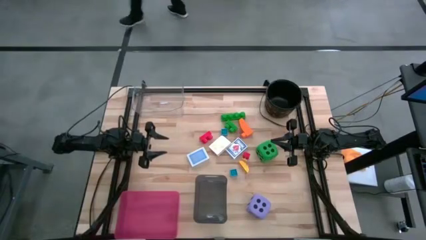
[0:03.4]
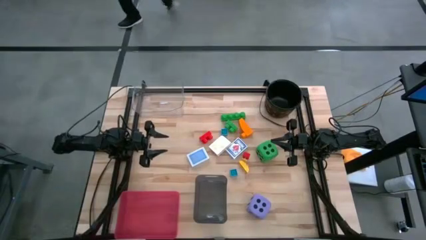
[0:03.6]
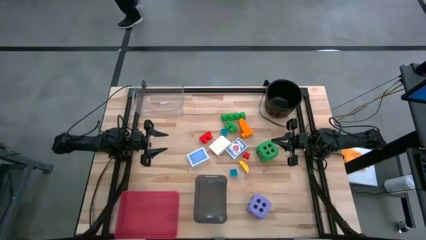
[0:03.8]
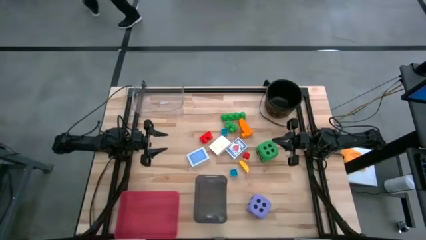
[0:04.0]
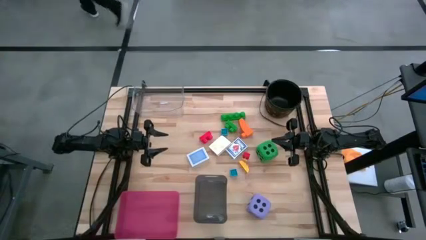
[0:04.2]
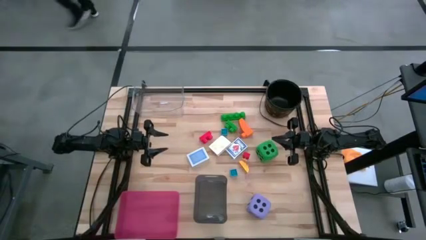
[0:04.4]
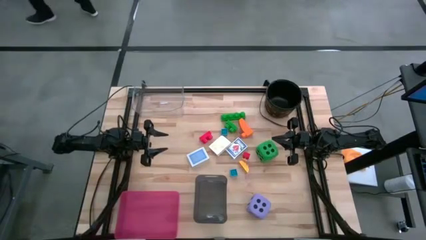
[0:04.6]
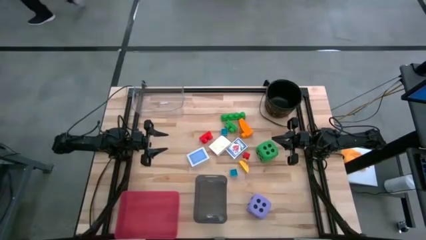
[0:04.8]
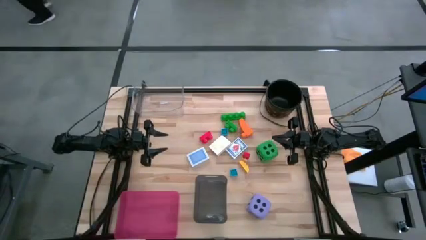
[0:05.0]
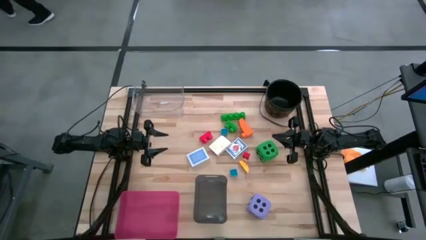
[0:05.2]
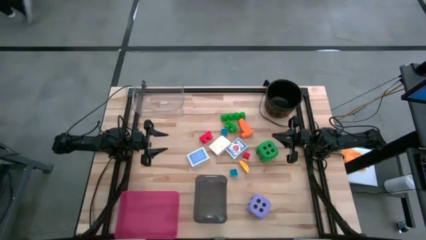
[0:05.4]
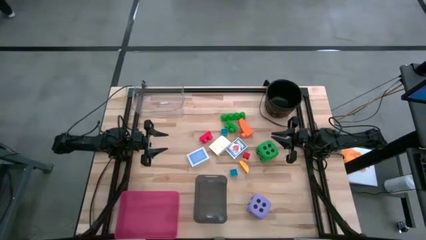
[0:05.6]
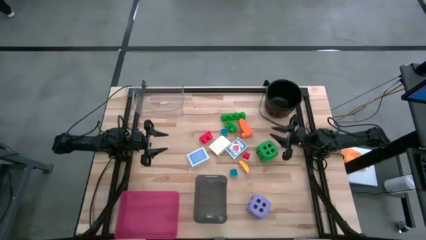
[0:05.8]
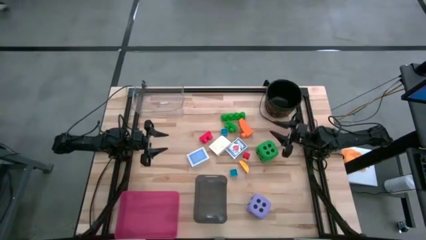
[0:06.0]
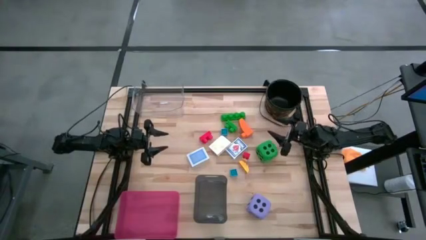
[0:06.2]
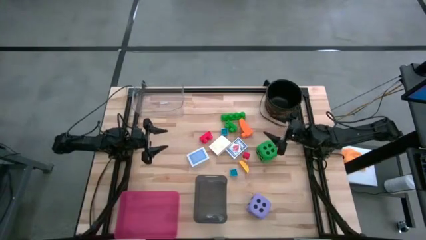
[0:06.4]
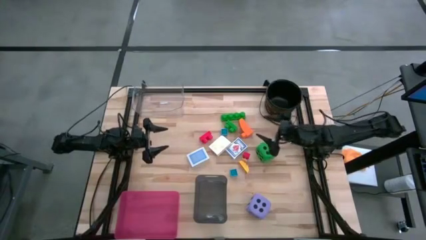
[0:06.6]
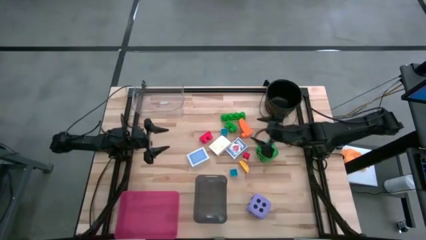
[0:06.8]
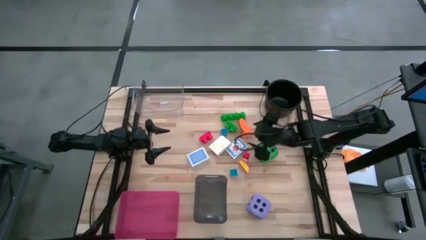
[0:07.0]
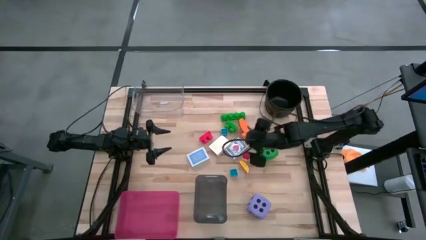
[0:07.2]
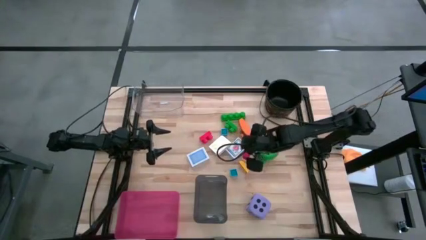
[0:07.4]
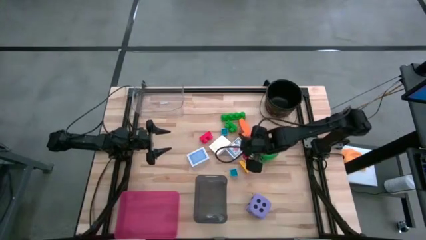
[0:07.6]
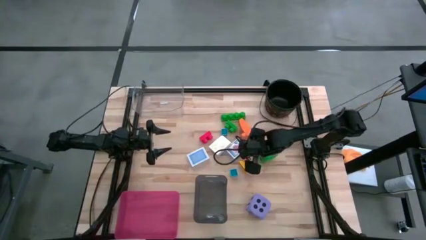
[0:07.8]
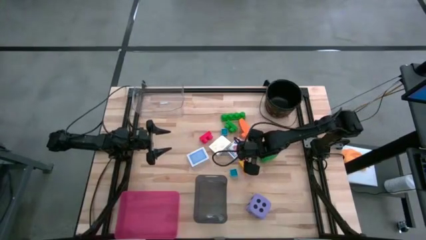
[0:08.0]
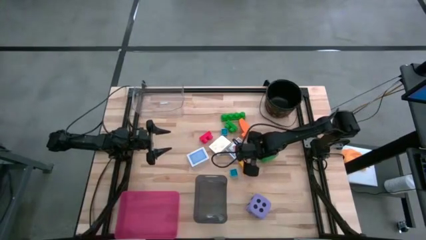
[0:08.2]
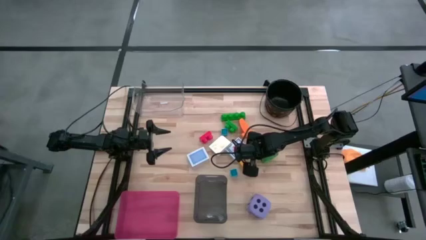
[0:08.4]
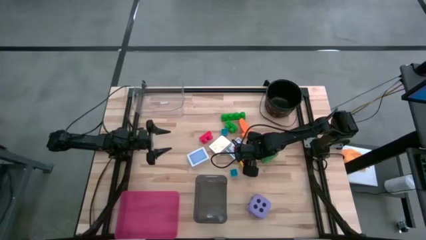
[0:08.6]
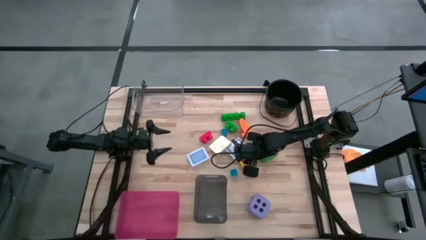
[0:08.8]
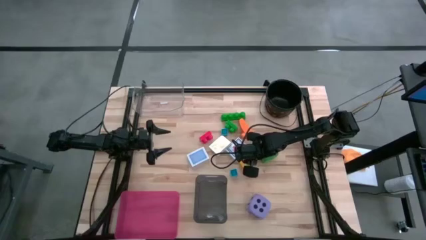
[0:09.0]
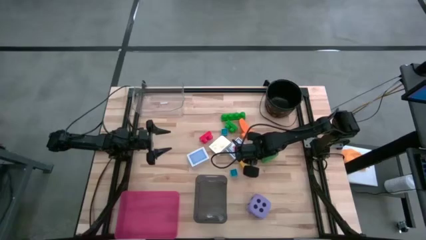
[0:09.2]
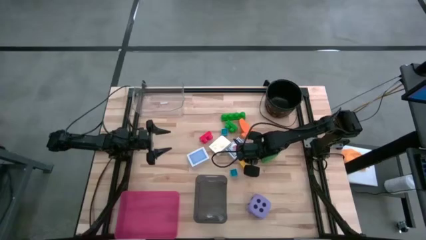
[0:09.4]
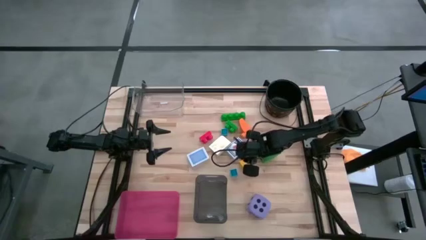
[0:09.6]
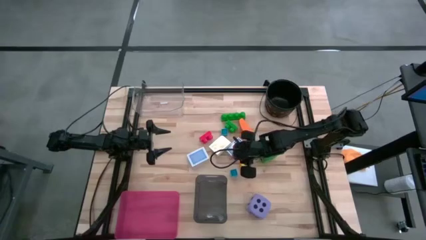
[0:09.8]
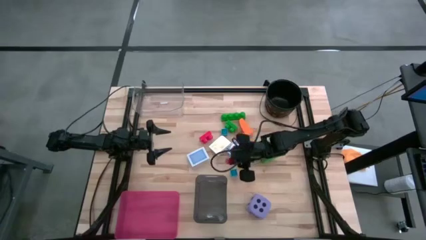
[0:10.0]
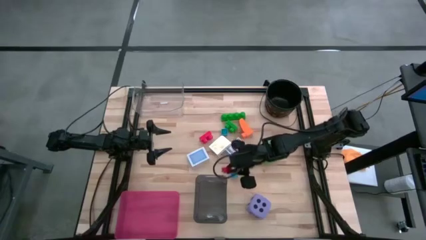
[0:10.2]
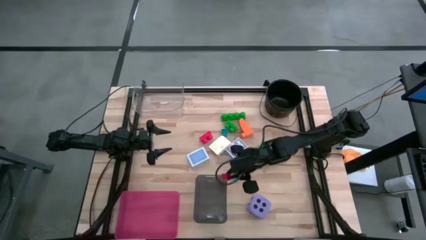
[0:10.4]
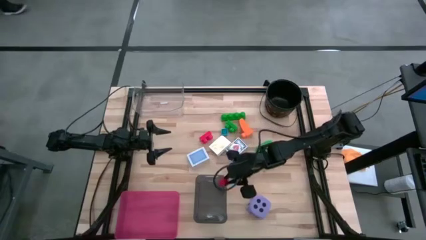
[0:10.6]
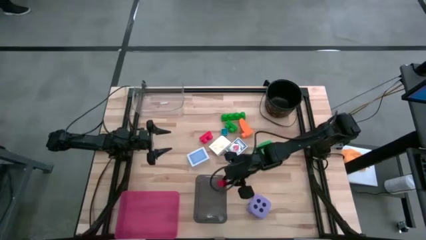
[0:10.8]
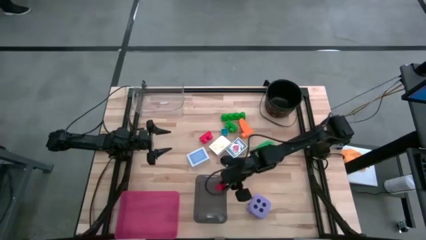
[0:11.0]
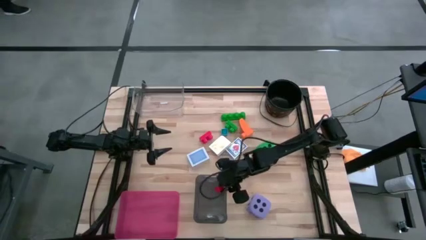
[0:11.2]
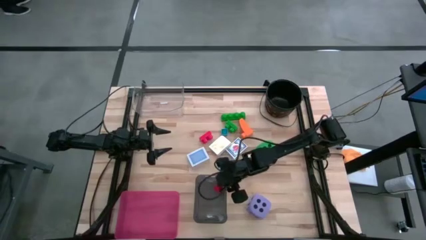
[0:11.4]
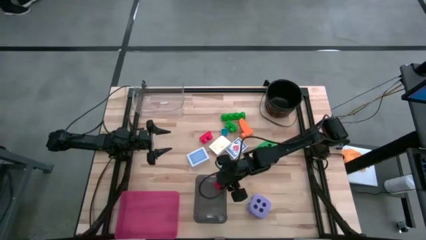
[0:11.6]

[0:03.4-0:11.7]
Task: Pick & Place Toys
Put red game piece into the black bin

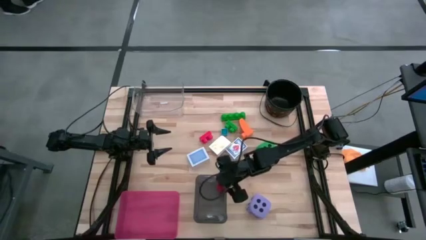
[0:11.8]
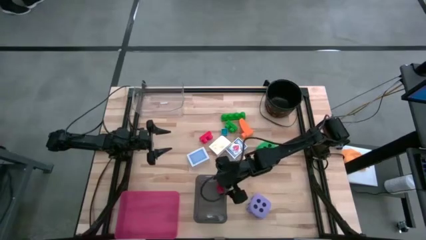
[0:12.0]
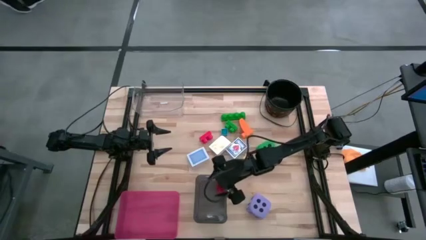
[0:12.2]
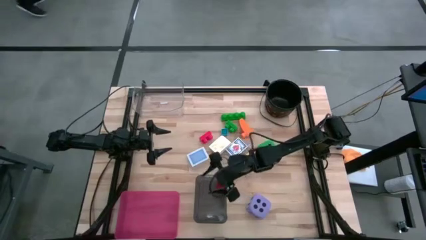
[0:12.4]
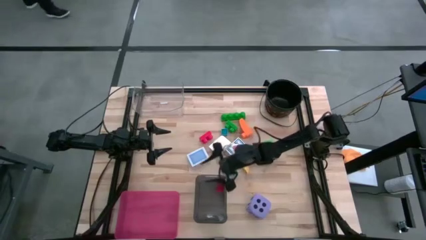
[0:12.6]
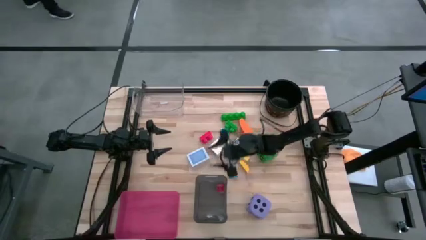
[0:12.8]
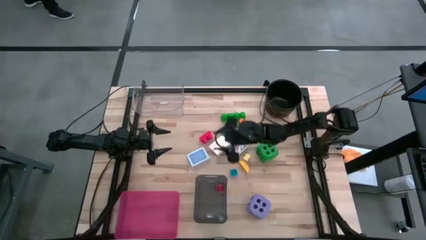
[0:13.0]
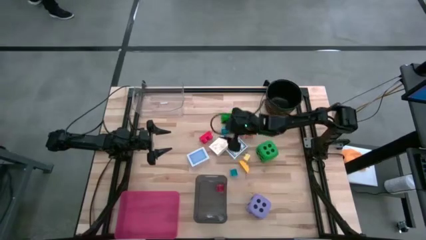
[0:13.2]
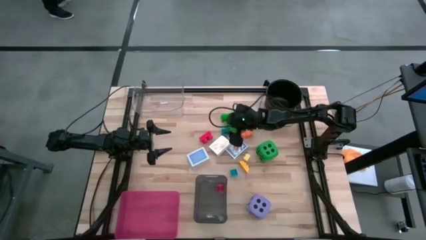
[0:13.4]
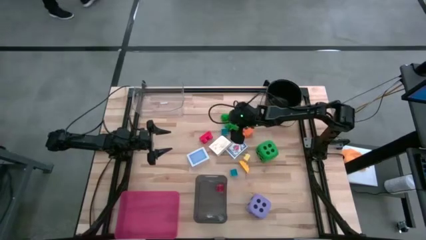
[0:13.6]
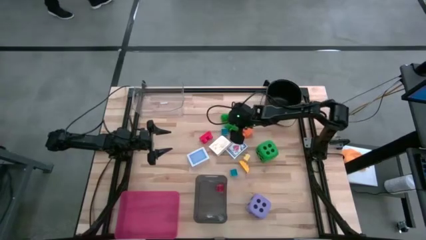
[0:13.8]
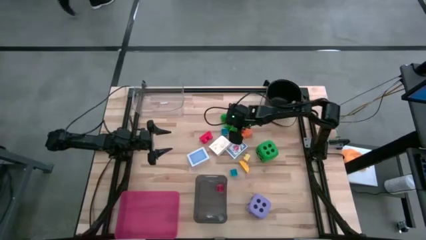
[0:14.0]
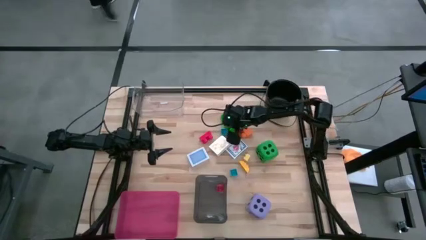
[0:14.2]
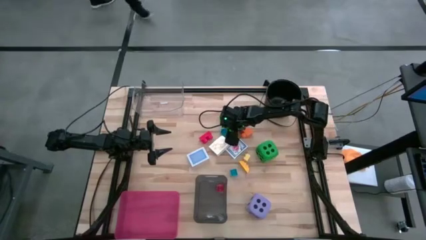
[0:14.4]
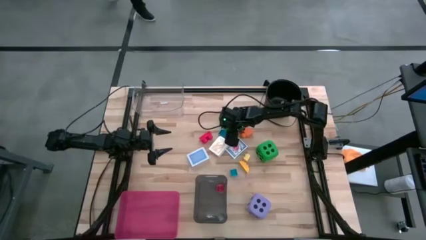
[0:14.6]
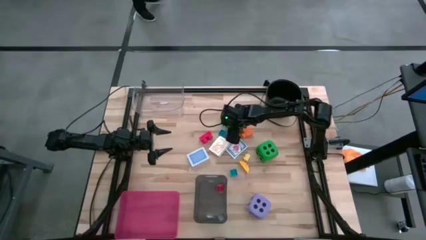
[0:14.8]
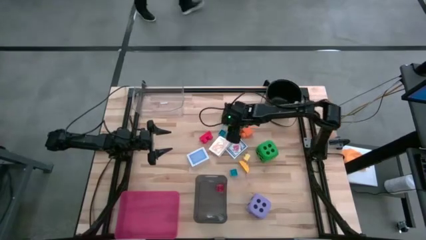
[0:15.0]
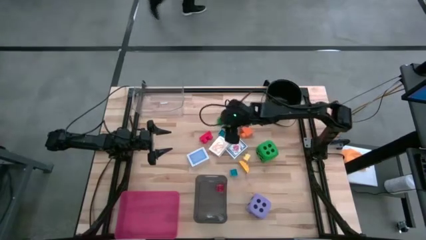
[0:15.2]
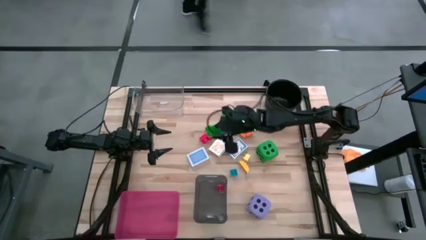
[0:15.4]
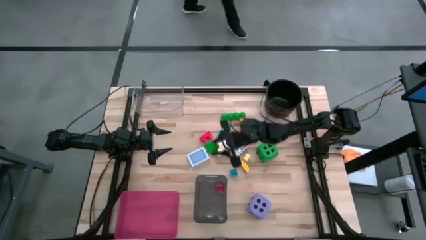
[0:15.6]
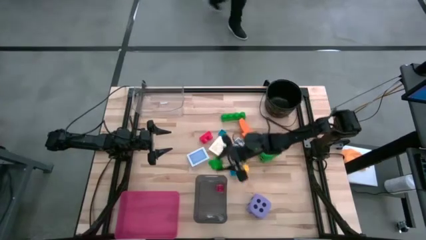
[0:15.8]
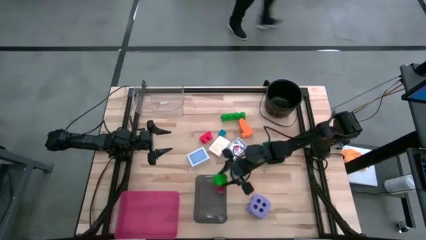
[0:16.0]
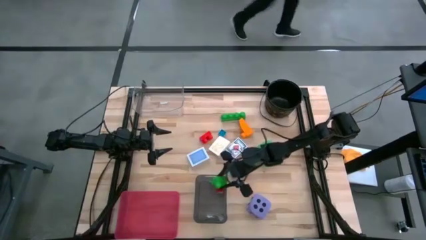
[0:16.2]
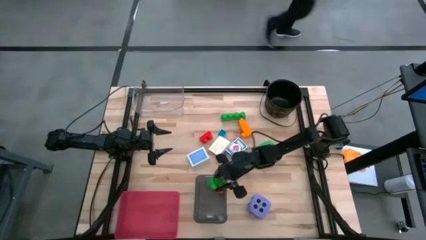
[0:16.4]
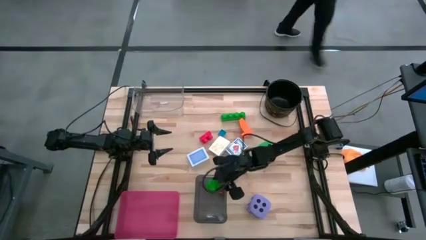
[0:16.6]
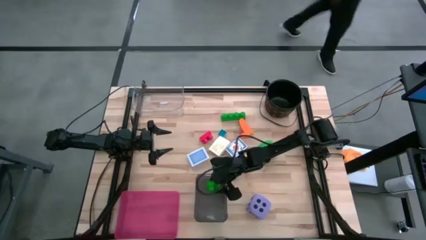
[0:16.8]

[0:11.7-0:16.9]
Put the green game piece into the black bin

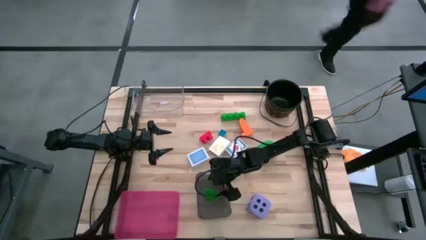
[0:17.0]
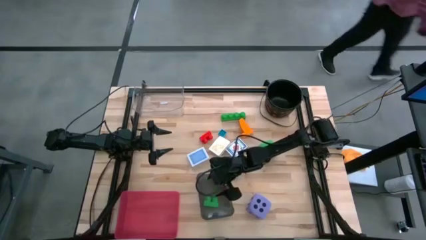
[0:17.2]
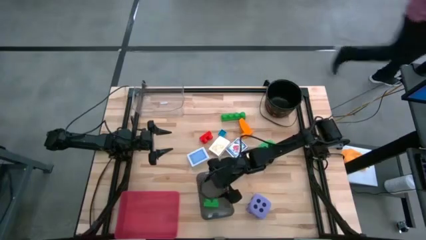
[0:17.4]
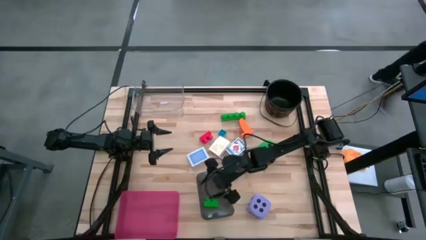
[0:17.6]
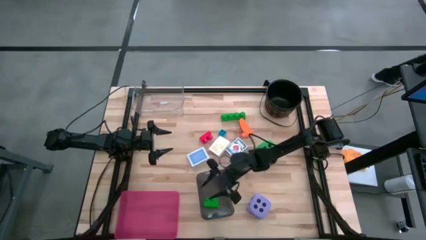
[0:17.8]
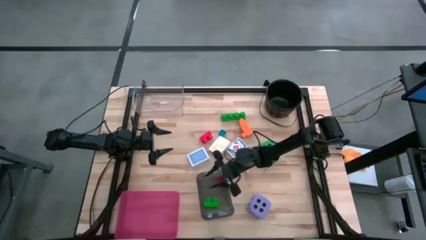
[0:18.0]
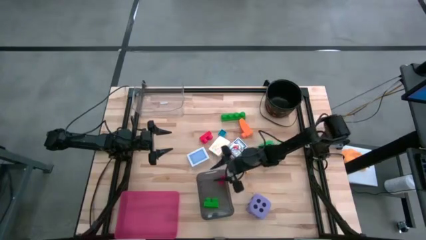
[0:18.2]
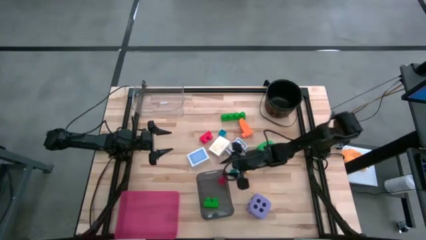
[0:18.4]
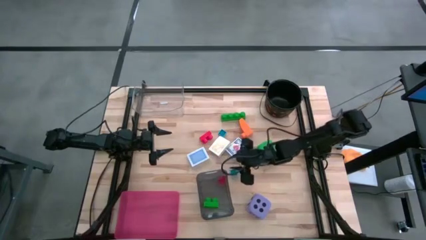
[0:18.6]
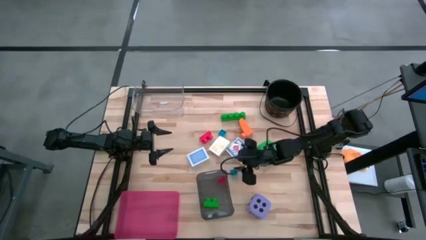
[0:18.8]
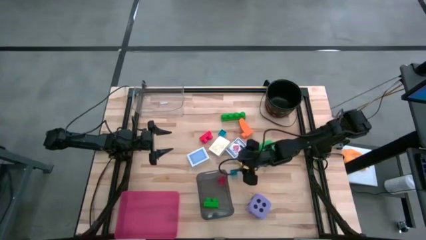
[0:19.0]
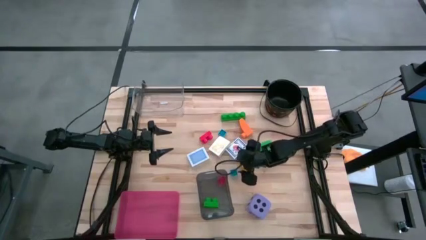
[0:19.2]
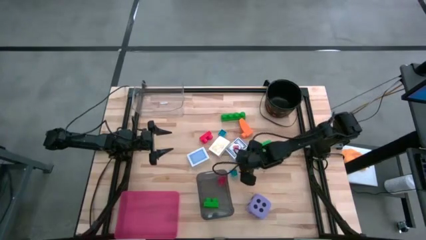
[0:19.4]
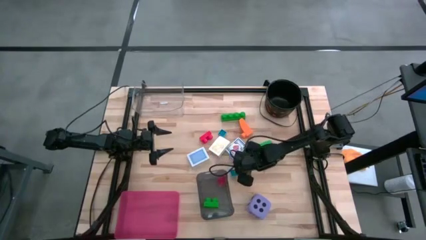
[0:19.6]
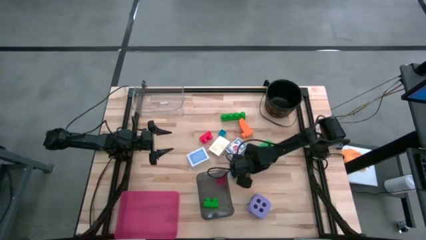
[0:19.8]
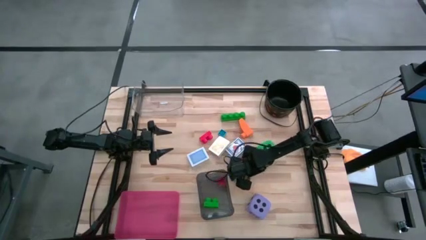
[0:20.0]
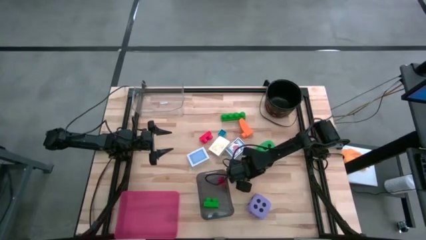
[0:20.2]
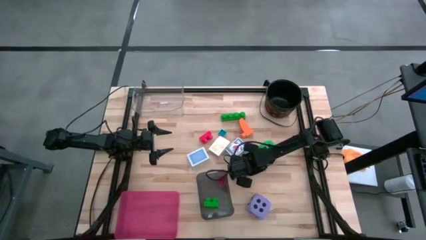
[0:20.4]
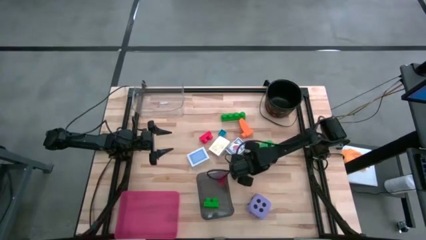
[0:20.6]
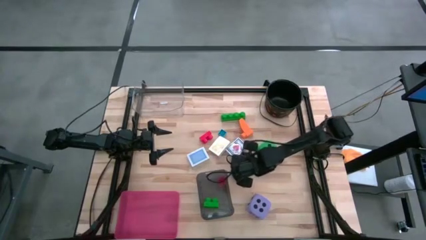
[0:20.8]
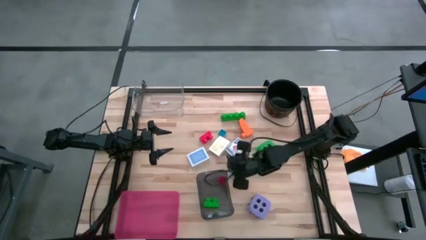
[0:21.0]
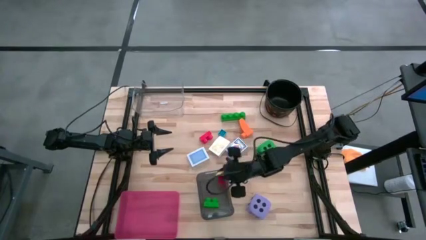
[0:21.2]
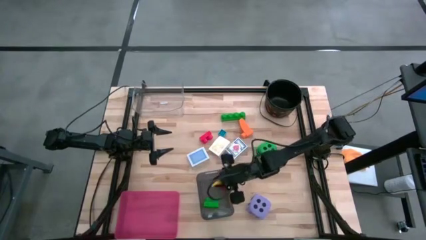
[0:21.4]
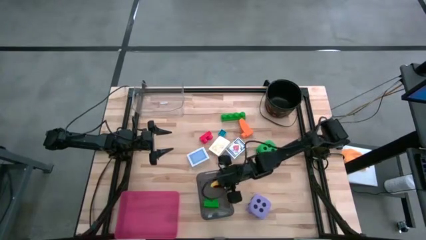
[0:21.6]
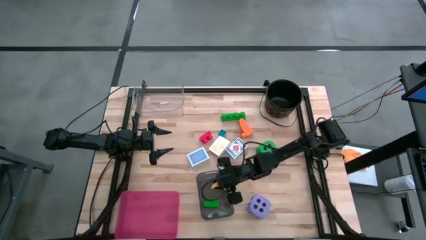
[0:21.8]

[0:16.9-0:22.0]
Put the yellow game piece into the black bin
